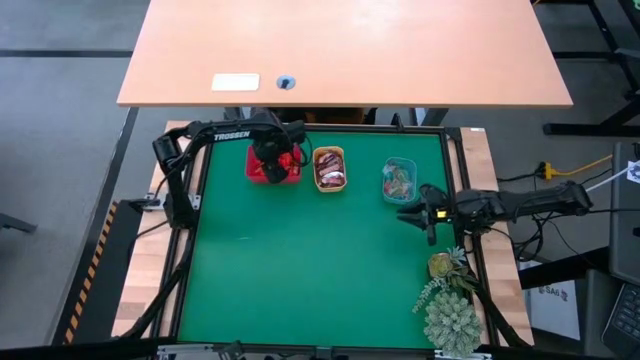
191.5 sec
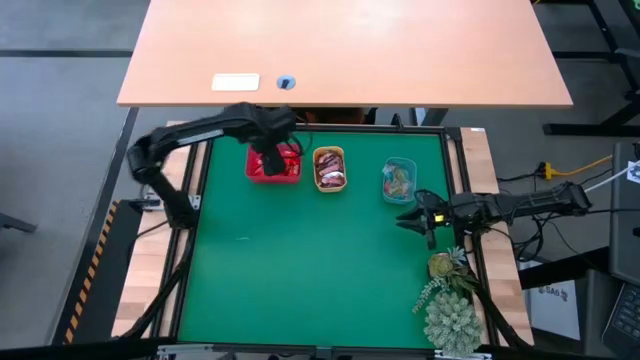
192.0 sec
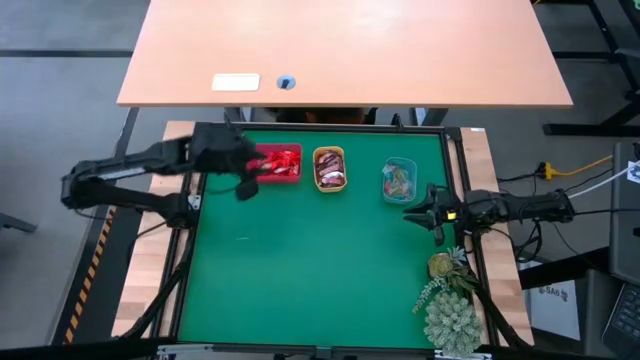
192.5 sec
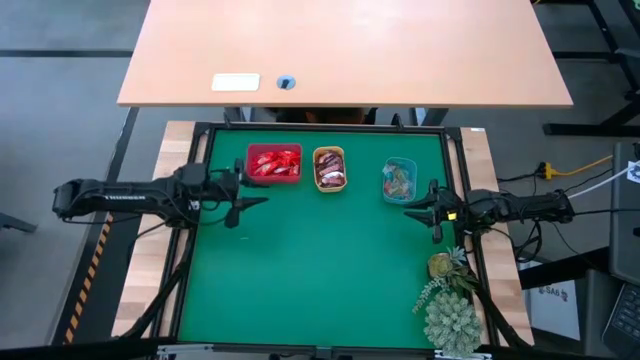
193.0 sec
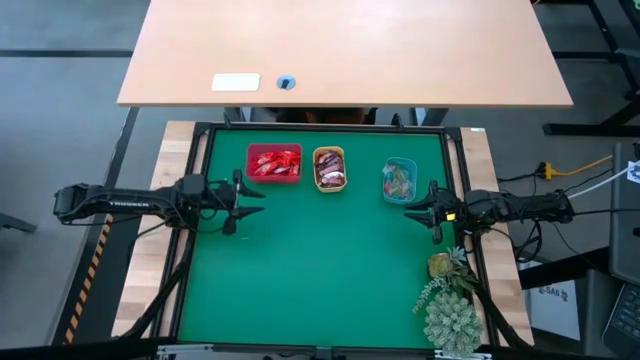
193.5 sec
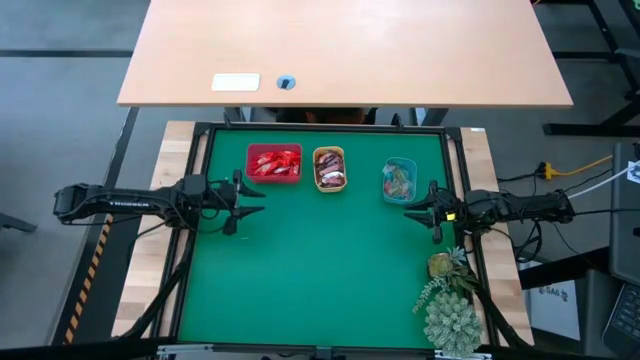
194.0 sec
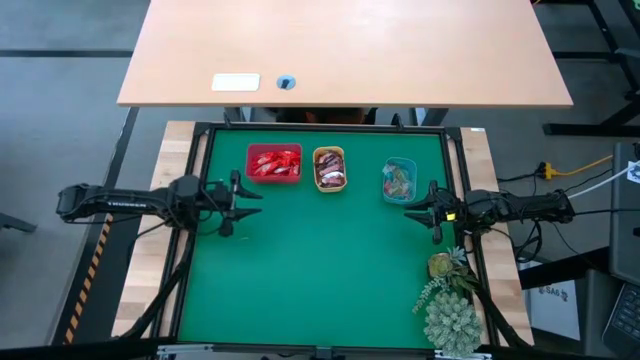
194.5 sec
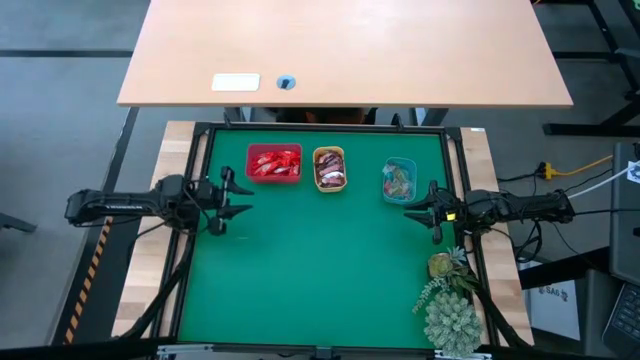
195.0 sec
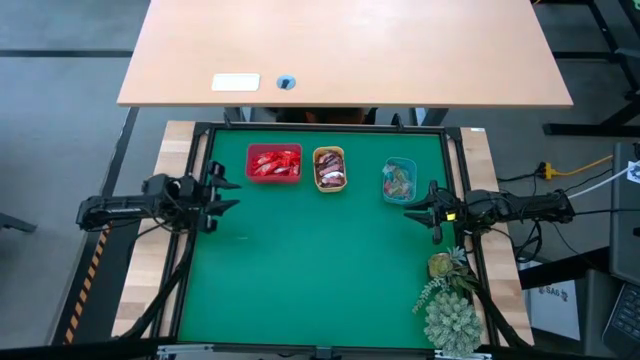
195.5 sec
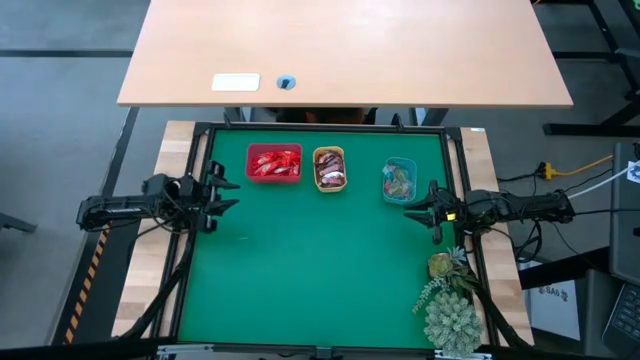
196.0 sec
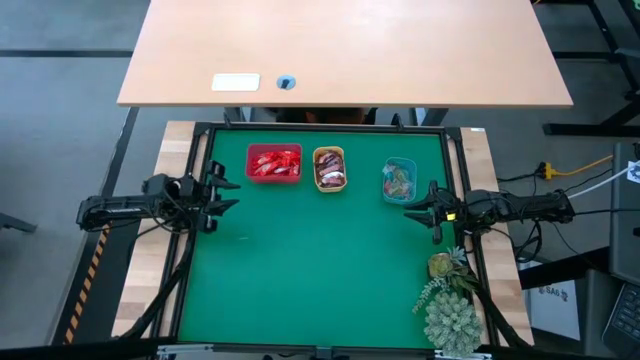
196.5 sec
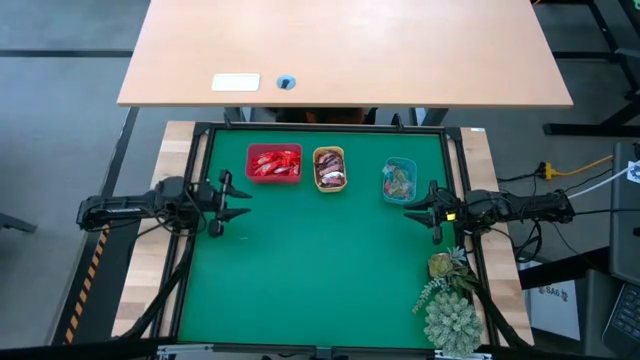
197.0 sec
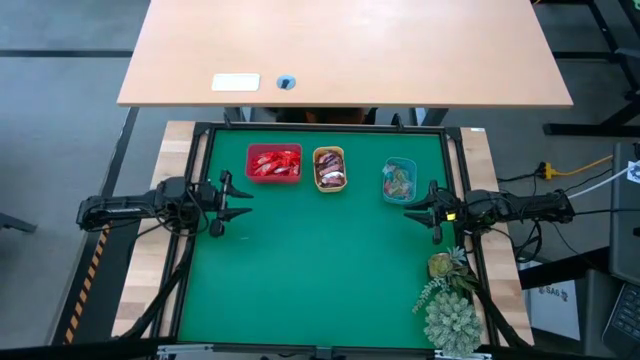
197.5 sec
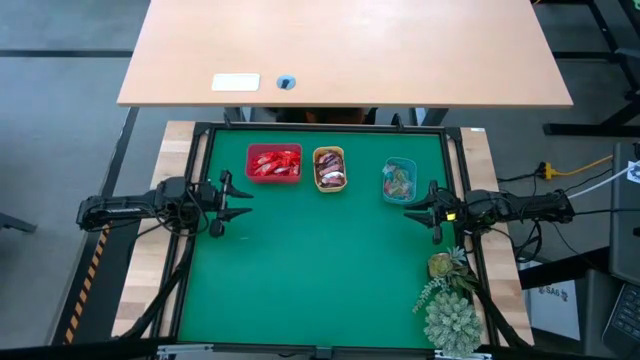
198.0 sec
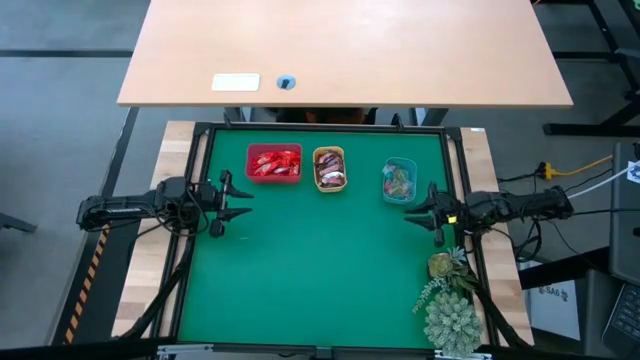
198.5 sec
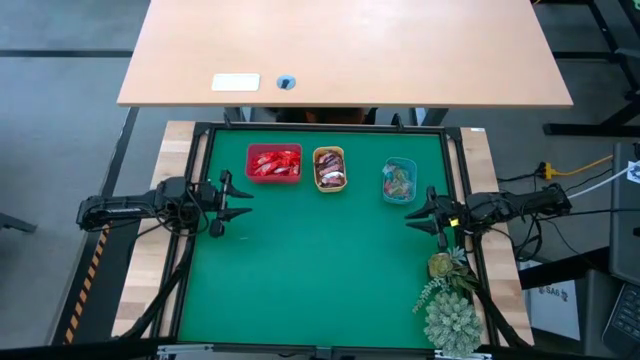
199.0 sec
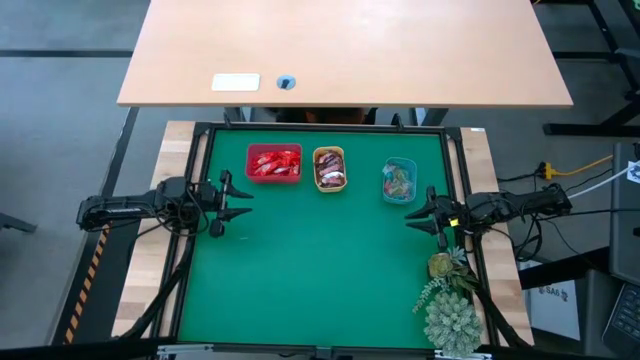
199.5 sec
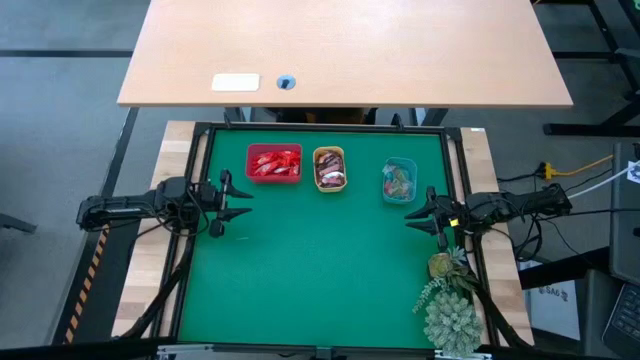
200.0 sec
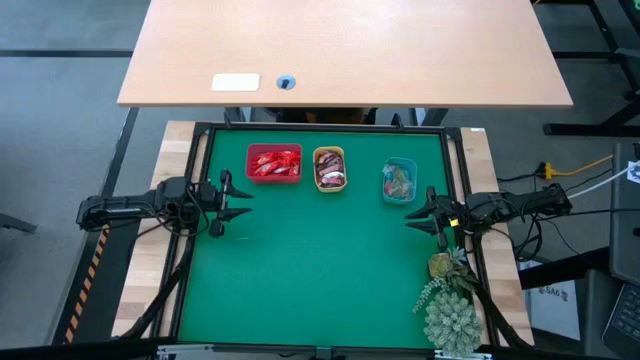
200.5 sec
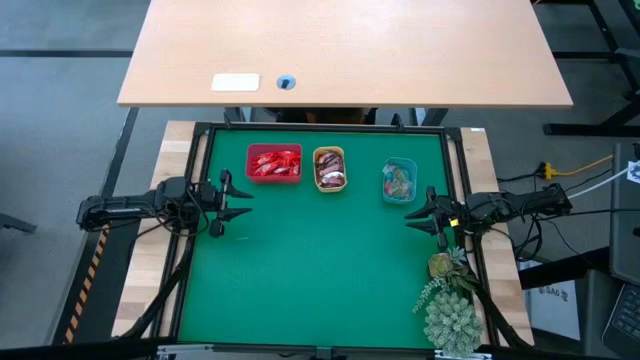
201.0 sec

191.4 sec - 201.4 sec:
Task: Sort candy
Return to Home Position

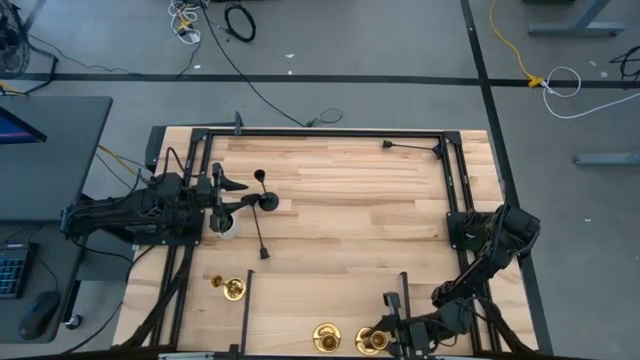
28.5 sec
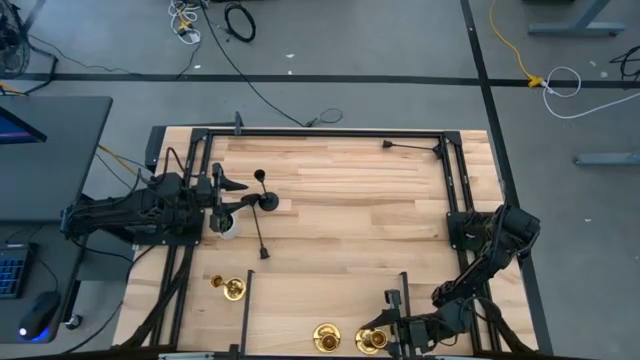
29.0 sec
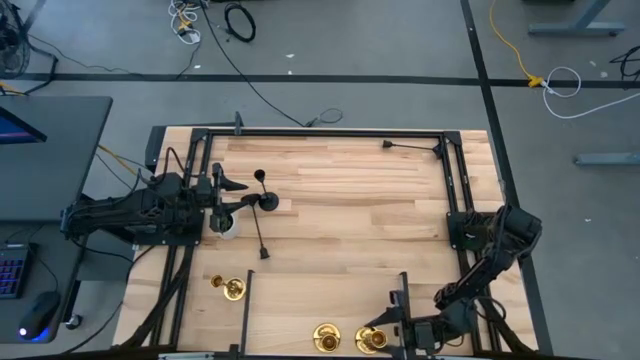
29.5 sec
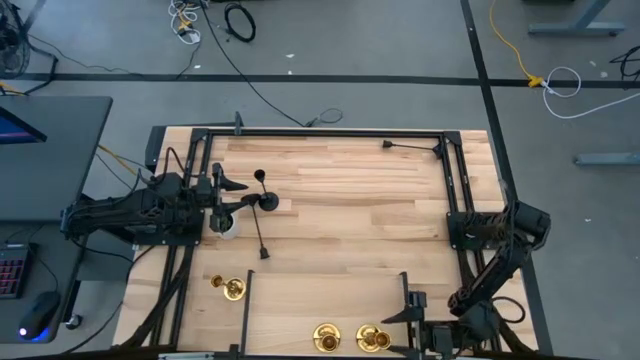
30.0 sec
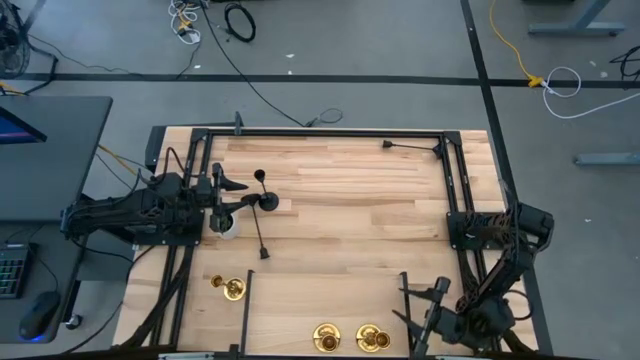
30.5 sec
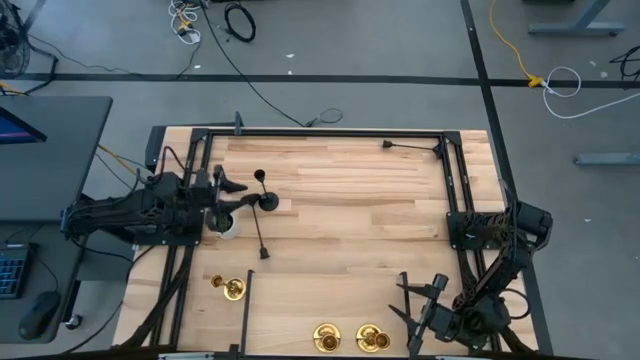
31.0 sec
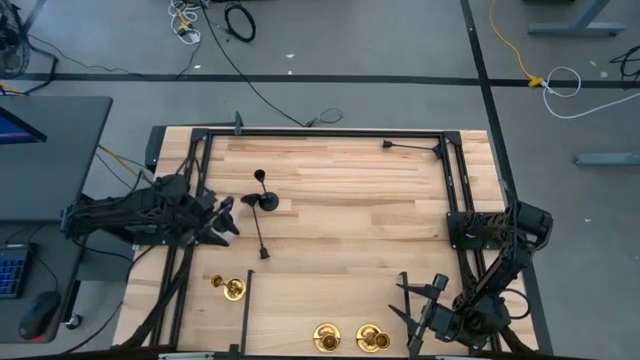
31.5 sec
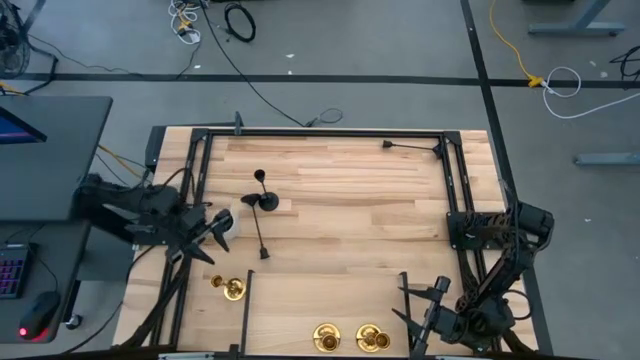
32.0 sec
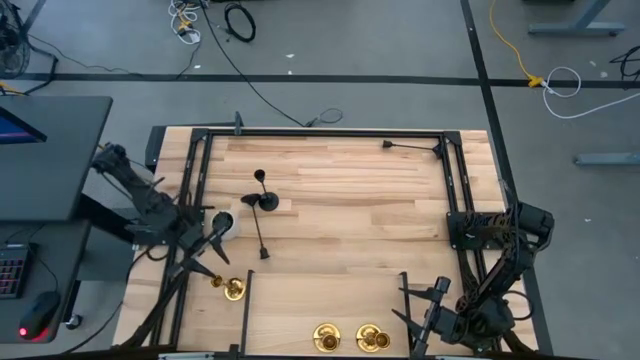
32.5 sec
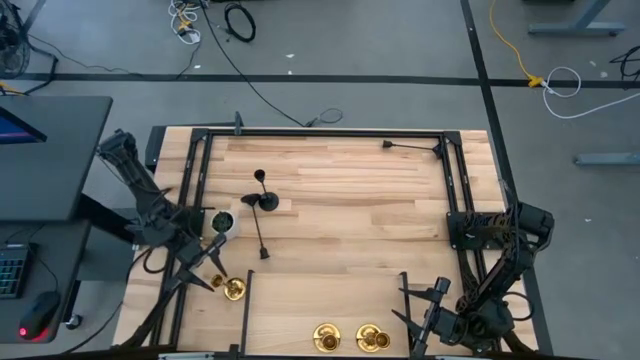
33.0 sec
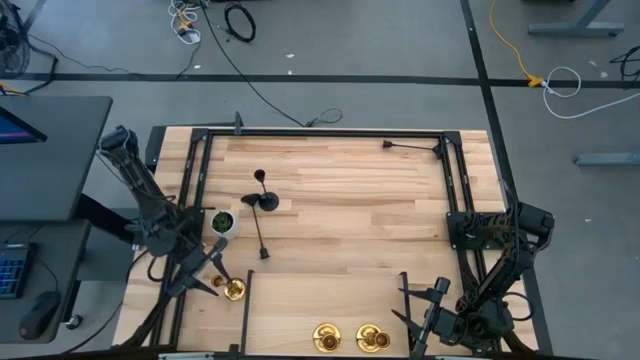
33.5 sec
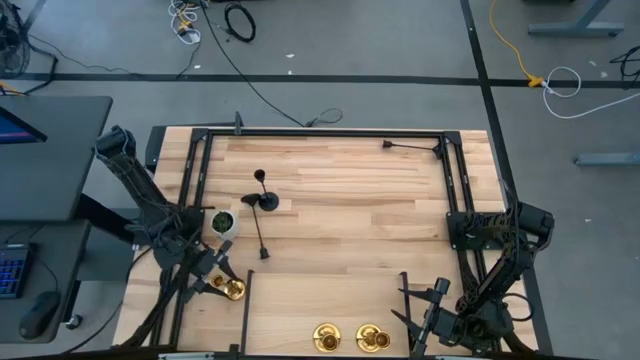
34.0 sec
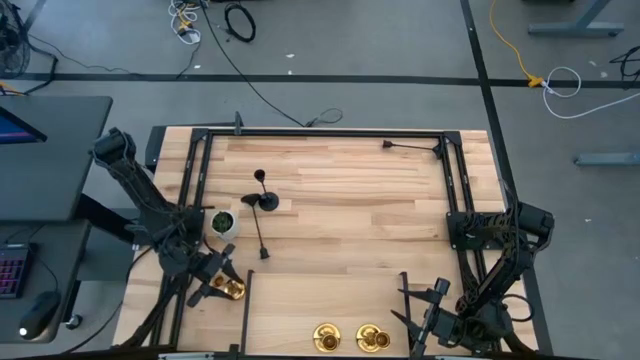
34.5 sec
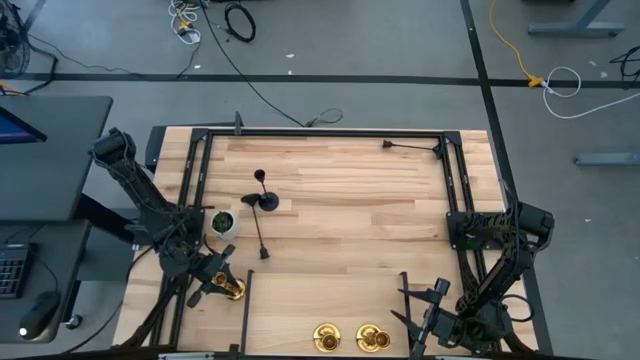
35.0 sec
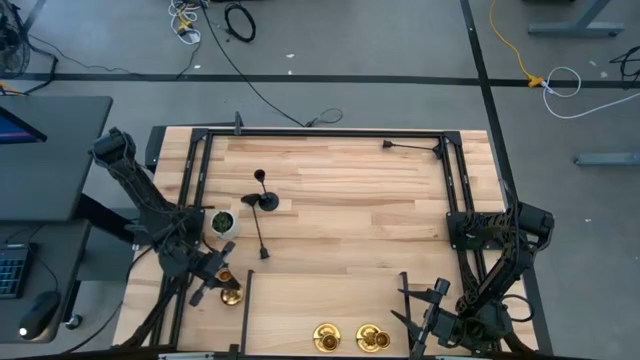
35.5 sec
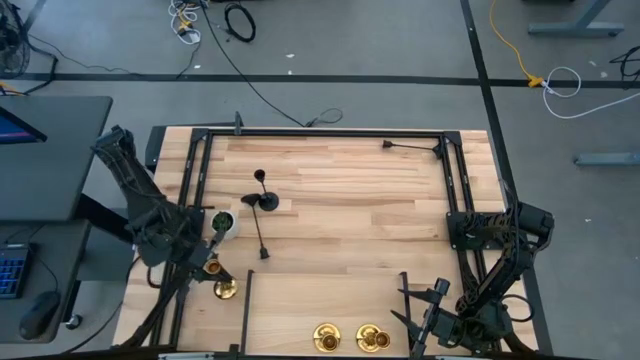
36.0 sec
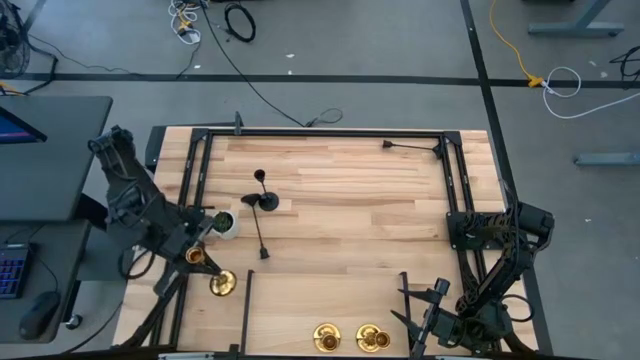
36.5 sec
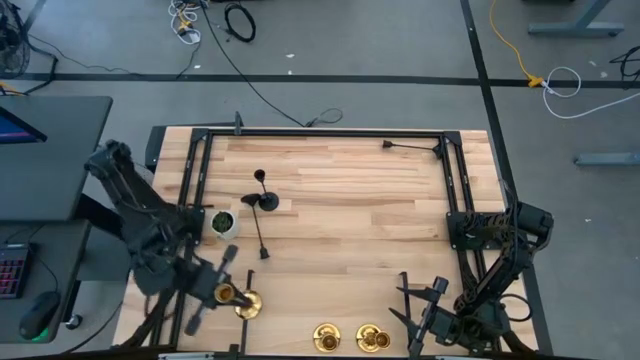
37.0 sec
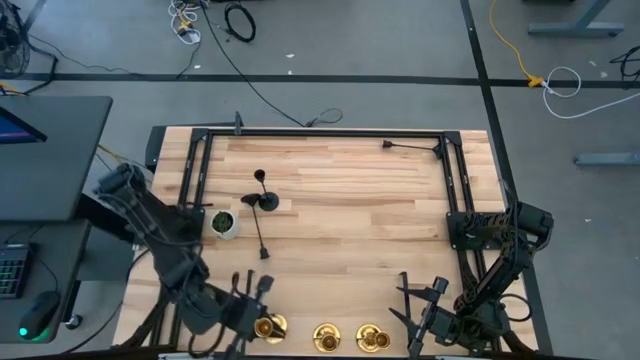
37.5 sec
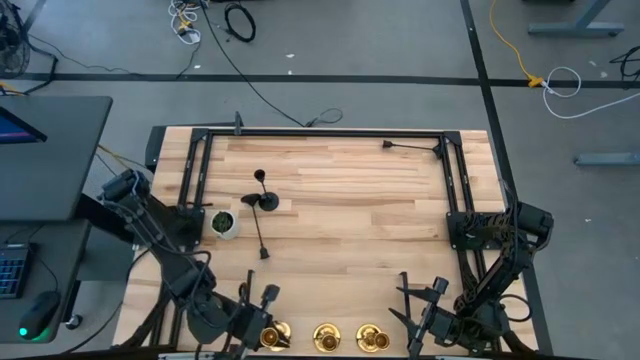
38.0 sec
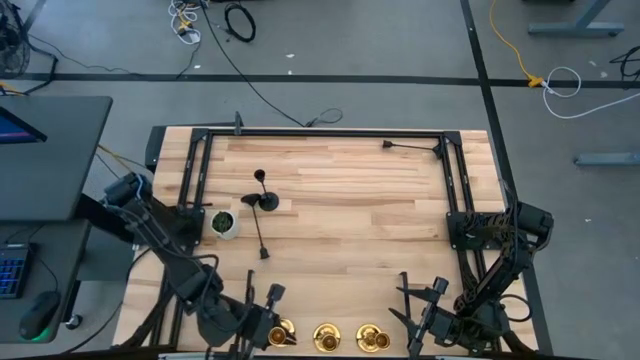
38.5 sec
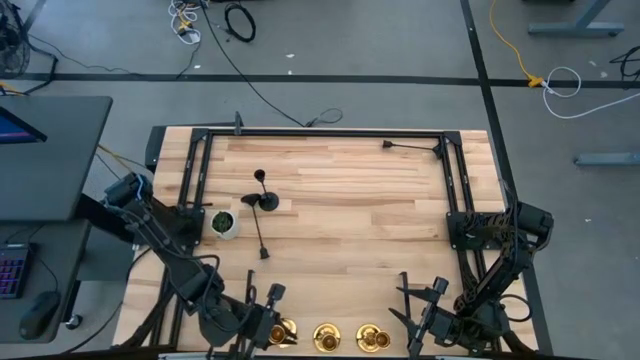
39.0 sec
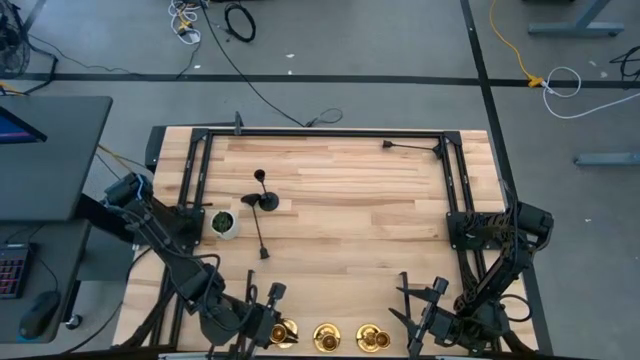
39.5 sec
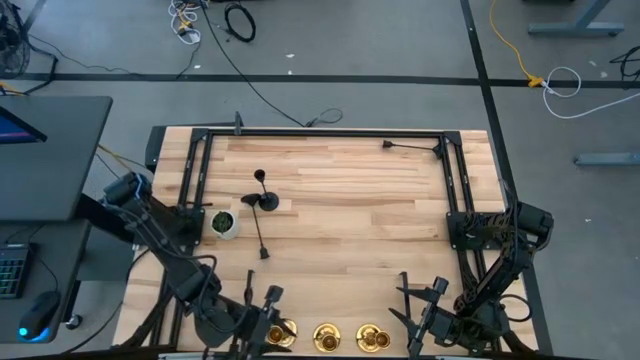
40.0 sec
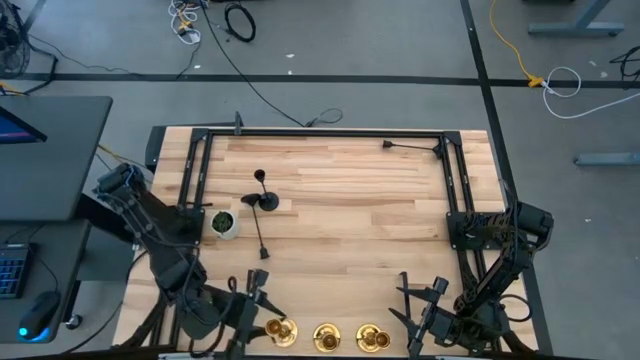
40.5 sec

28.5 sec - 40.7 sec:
Task: Pick & Place candle stick holders
Put the yellow candlestick on the shelf
